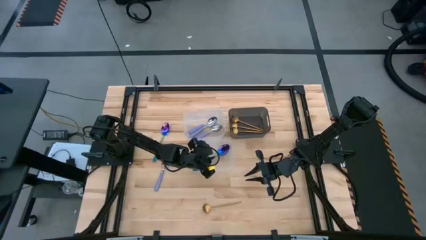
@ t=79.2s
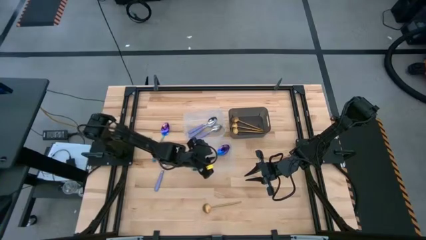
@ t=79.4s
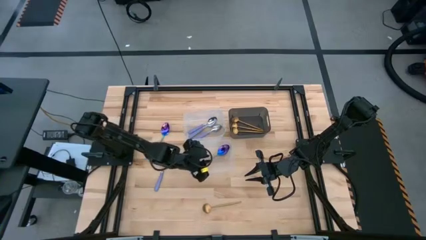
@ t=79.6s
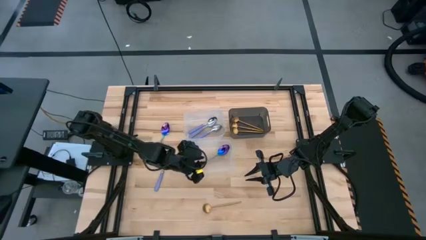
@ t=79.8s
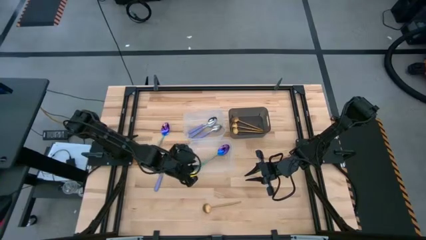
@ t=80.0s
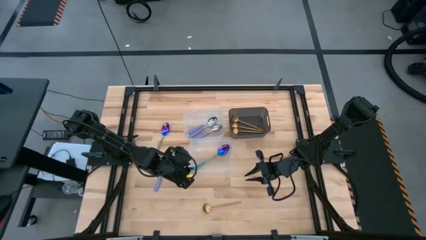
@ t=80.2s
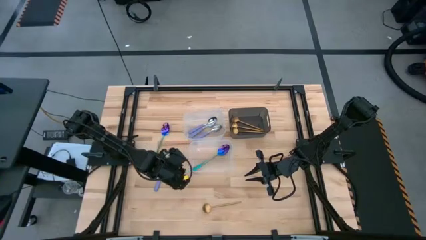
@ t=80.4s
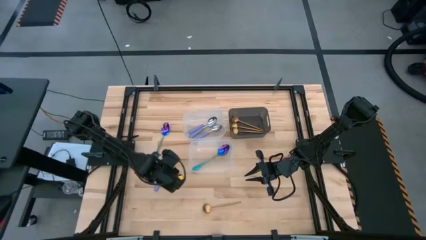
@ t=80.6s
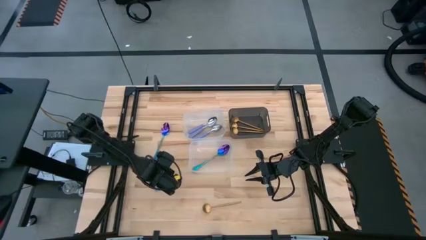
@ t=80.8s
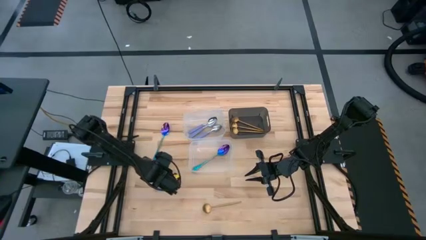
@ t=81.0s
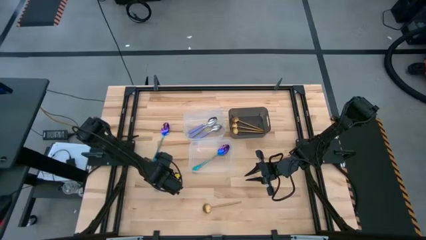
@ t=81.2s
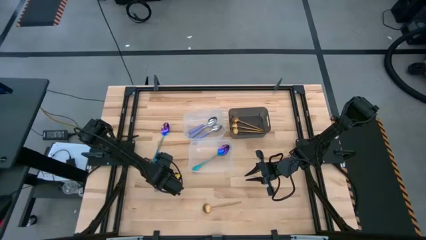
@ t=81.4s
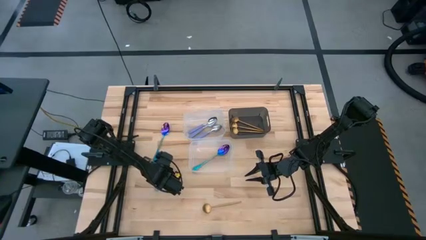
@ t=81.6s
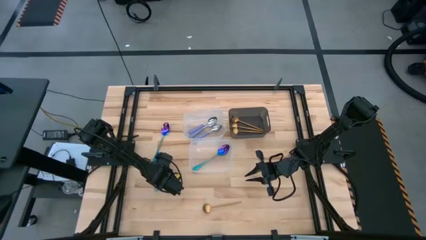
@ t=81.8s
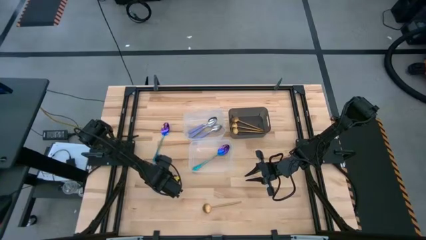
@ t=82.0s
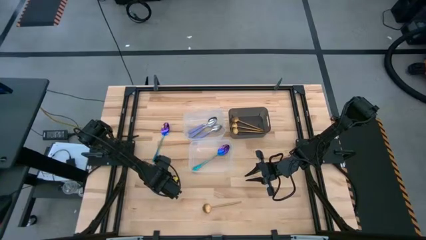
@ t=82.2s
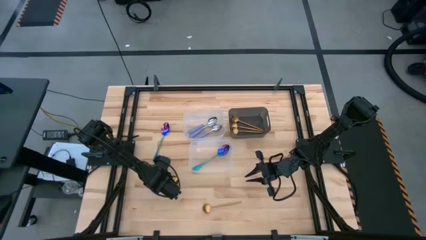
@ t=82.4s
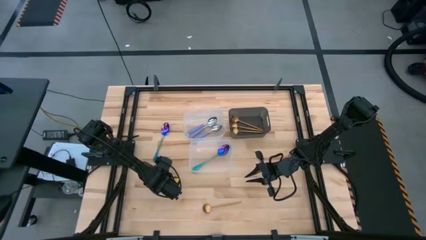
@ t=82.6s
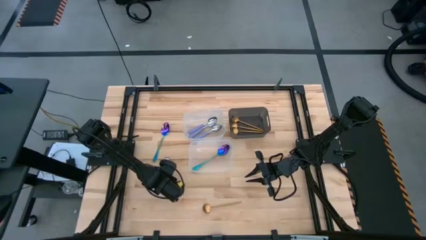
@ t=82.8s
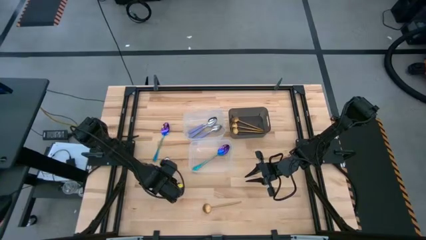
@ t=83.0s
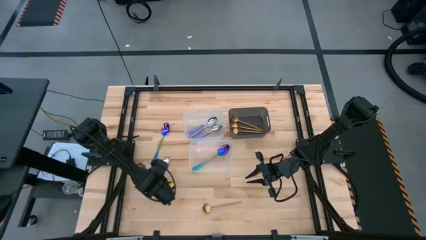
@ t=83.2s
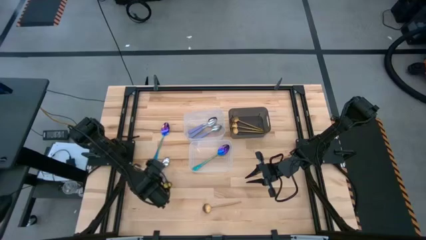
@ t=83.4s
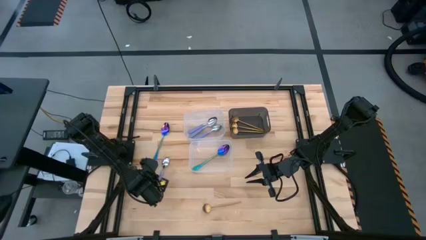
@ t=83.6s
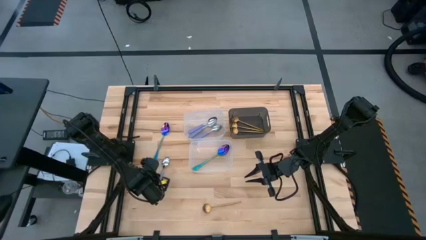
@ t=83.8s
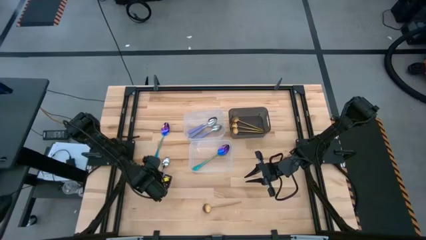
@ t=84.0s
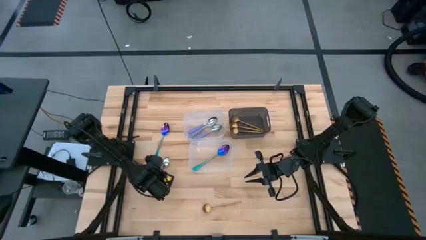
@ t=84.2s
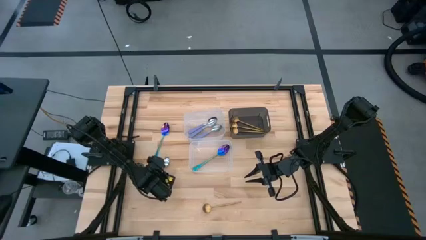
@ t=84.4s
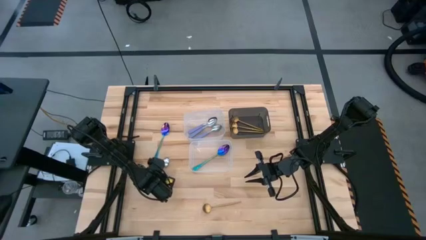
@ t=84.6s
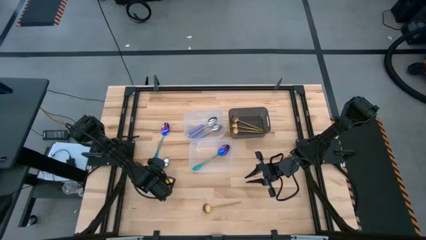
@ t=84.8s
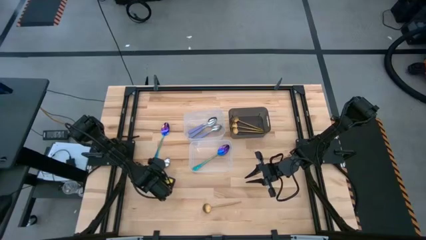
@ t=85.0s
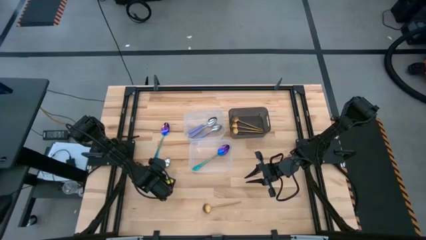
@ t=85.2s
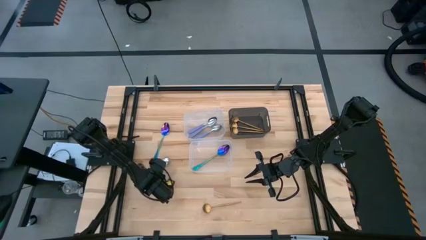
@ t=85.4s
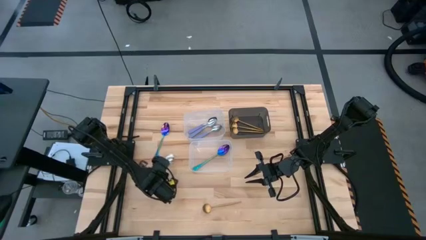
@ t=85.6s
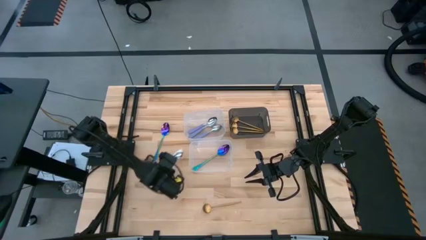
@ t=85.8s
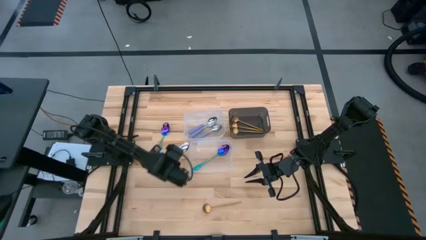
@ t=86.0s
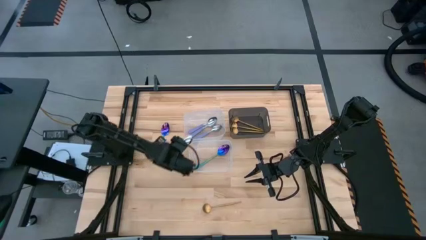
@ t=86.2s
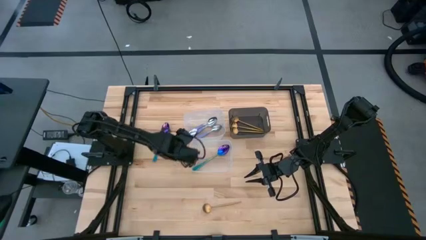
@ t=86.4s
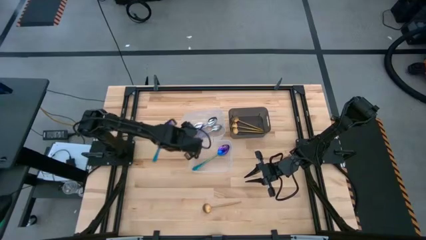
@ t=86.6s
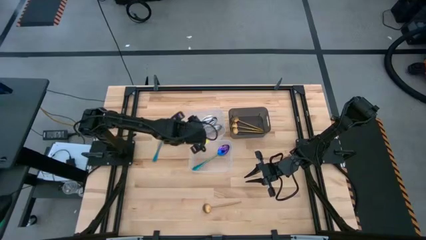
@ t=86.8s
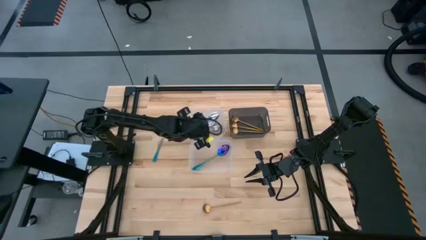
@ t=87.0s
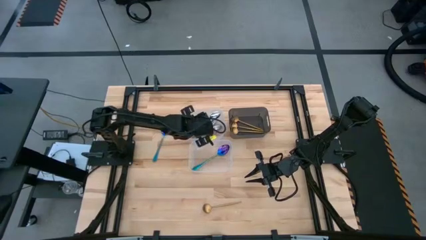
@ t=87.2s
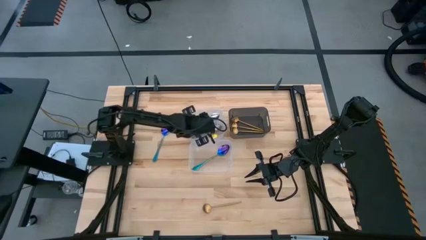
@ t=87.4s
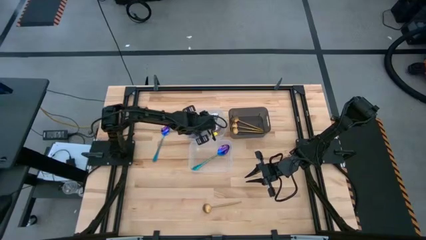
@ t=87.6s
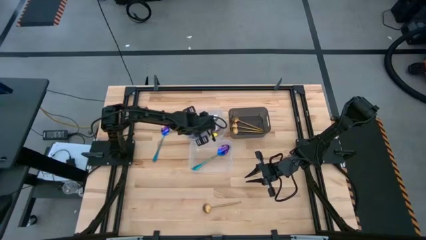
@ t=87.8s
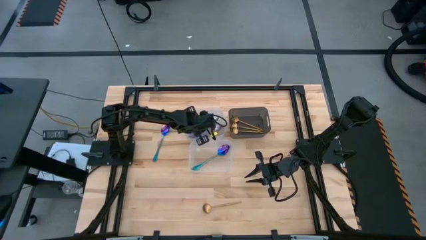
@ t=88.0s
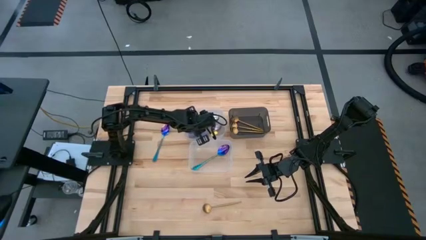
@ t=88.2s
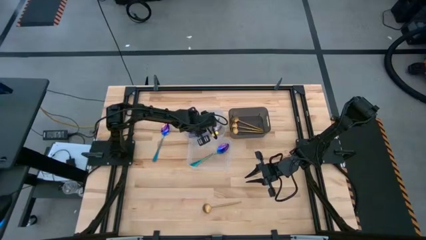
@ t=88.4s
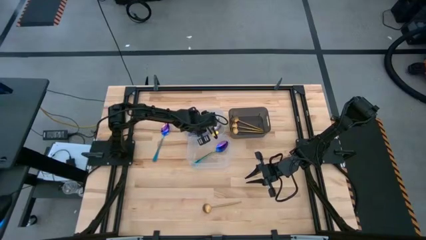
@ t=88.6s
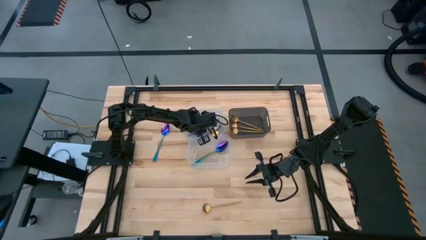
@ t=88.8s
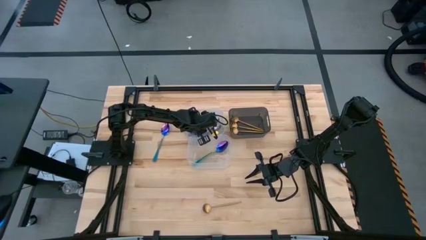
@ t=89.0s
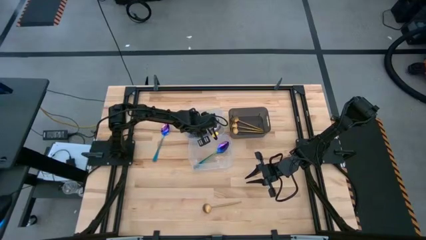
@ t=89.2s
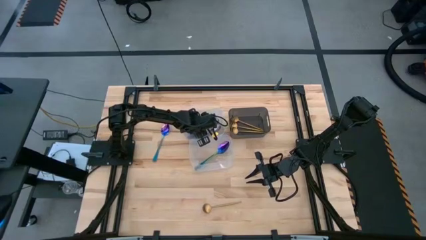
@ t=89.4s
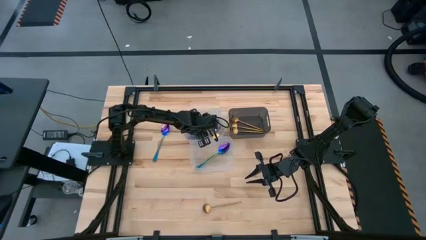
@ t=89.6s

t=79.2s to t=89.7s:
Task: Sort silverware by color (type)
Put the blue spoon into the top transparent bin

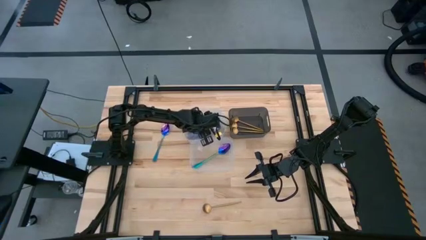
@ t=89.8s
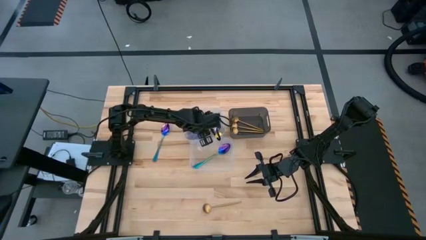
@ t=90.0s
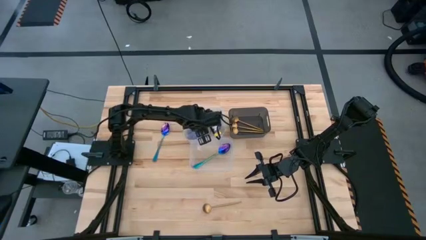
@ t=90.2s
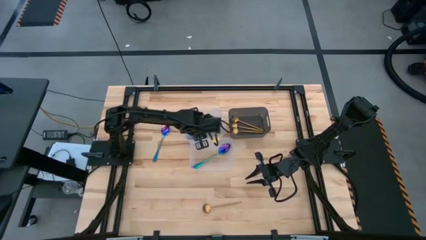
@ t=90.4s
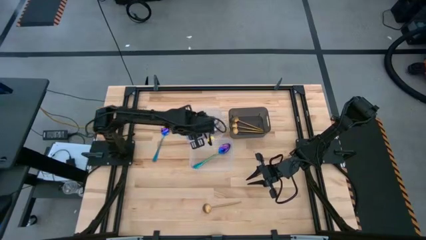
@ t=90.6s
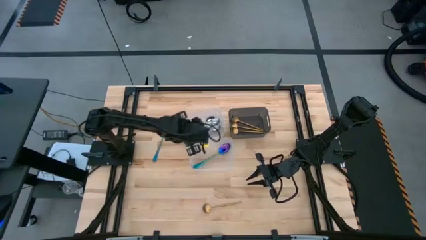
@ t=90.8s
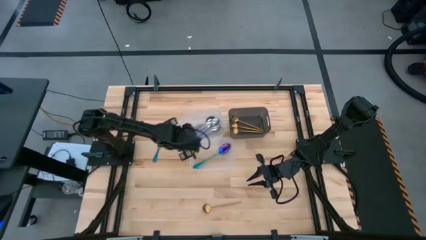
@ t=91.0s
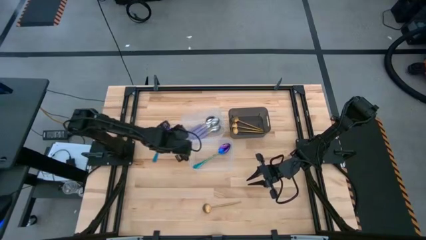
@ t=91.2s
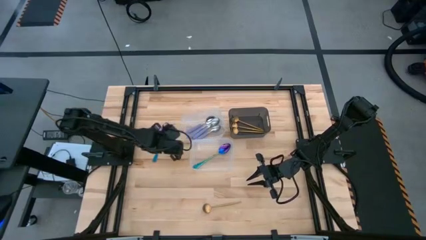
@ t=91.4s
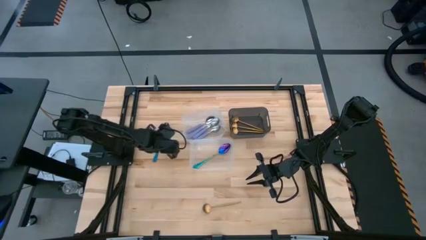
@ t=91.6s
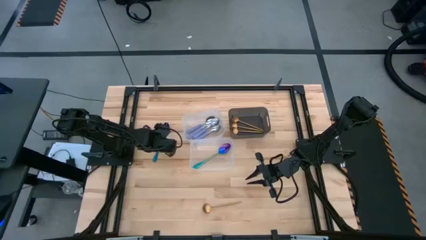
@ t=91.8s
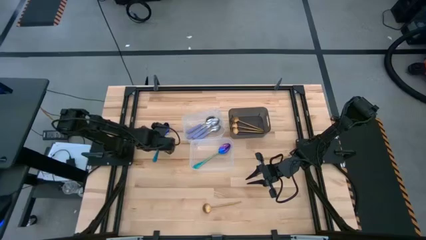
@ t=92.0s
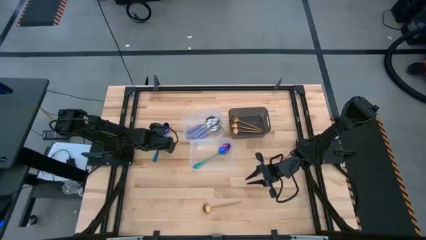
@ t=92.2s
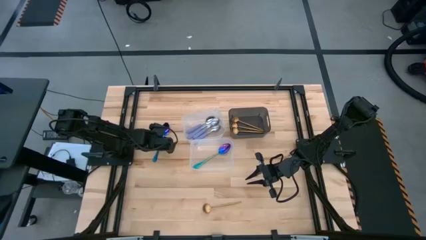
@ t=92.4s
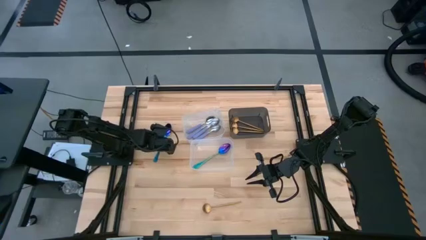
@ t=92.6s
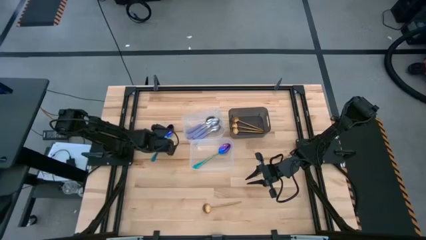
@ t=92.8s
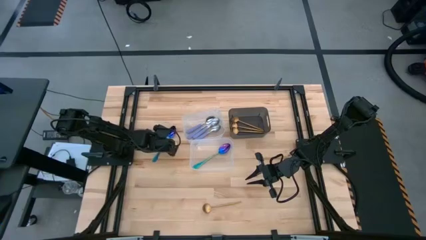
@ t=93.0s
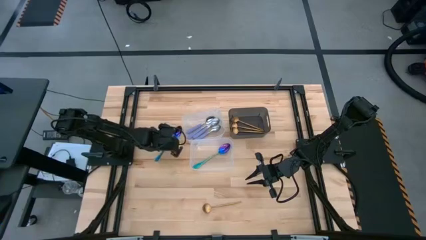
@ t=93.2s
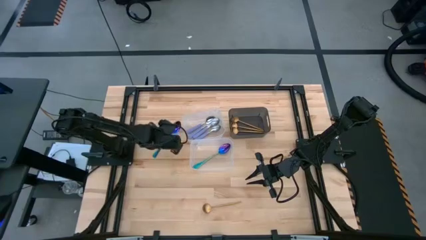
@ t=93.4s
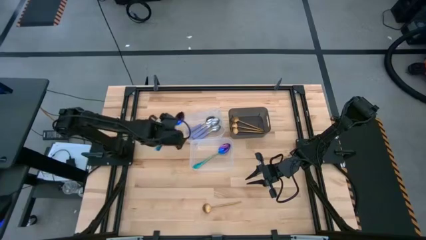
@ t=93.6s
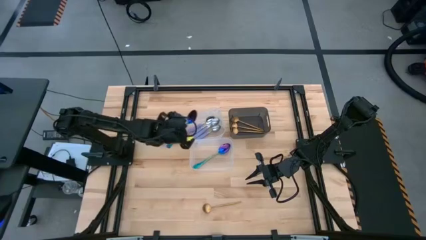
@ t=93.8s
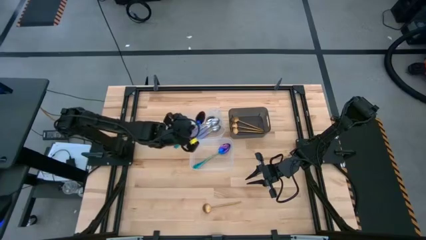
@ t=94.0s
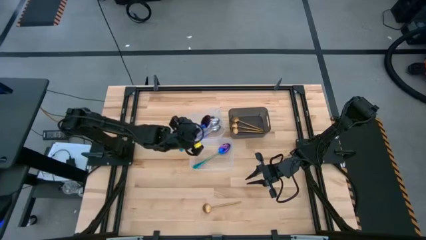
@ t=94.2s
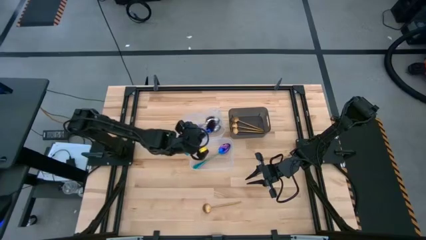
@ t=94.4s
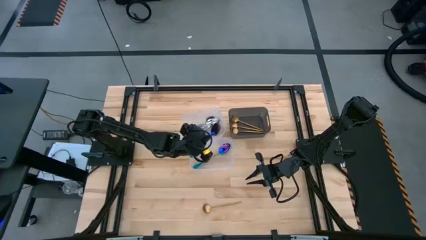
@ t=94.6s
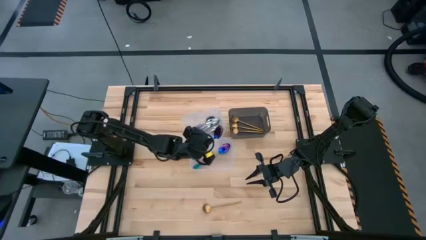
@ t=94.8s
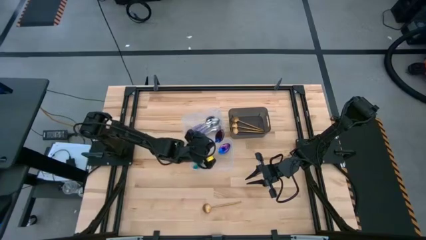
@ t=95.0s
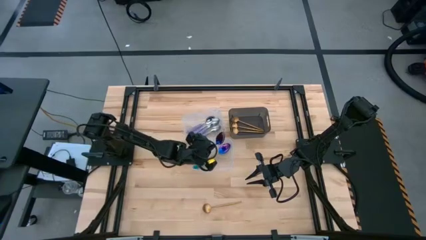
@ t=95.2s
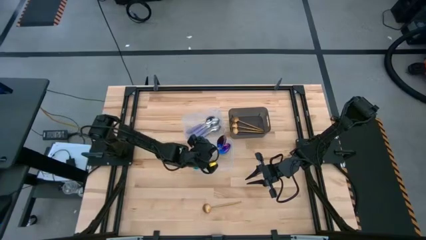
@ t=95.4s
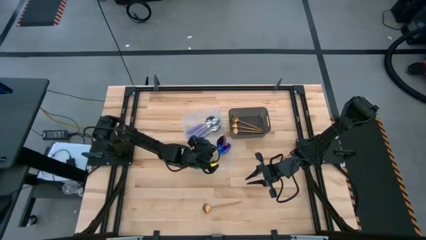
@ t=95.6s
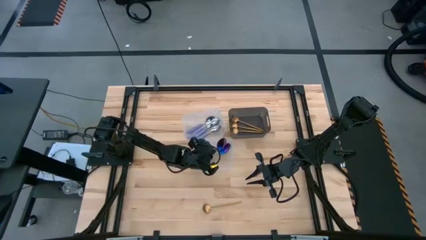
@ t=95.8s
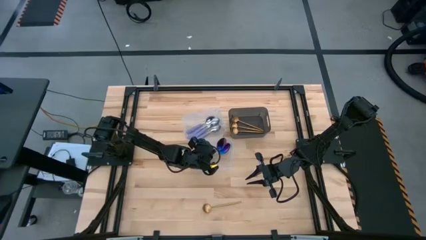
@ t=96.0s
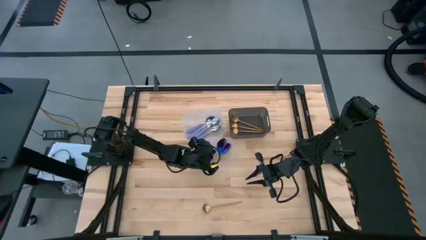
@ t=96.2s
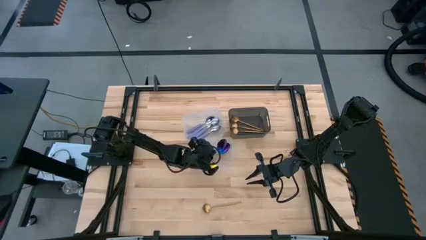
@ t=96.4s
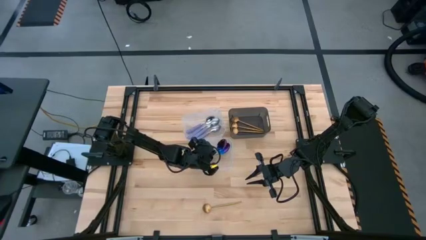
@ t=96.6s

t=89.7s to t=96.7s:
Put the purple spoon into the bottom transparent bin
